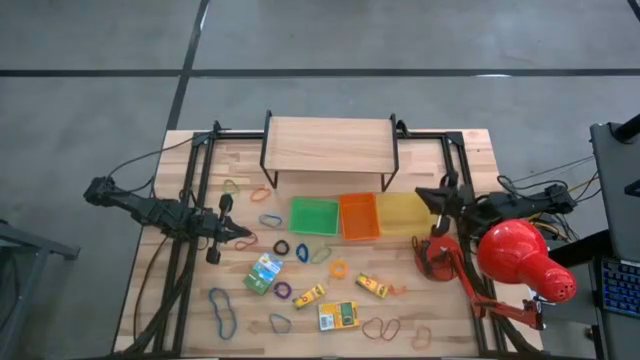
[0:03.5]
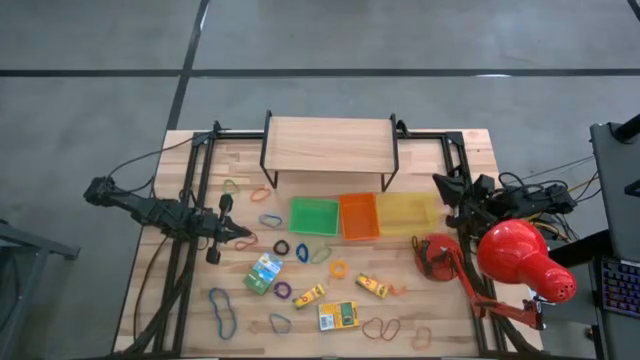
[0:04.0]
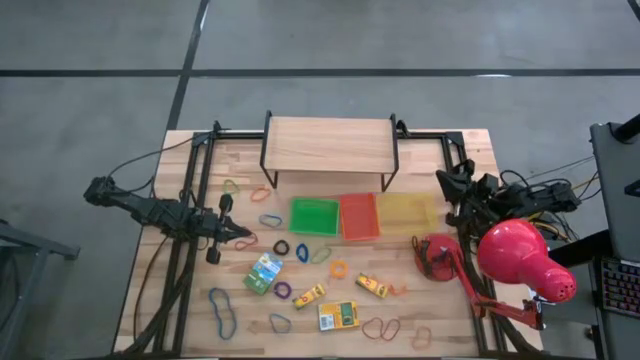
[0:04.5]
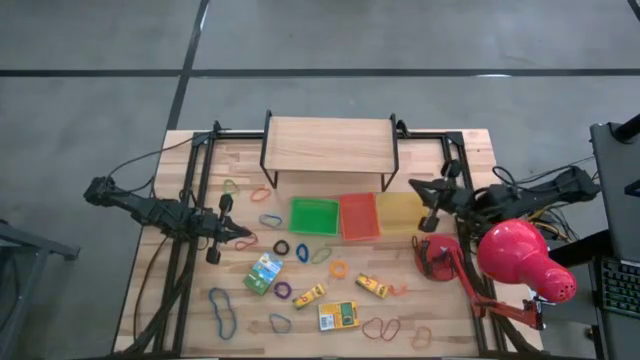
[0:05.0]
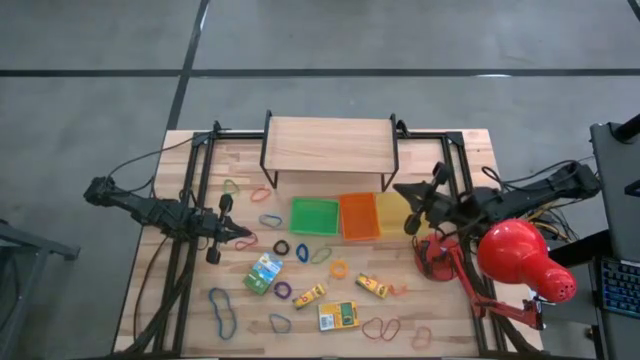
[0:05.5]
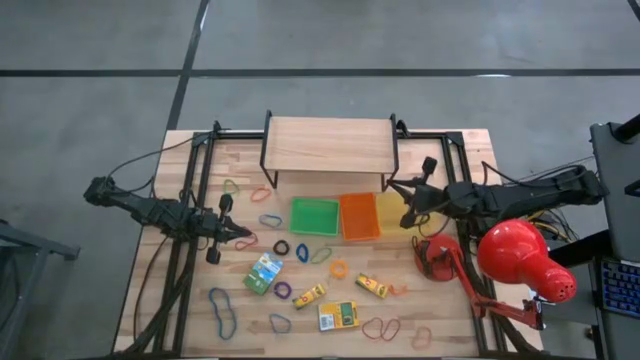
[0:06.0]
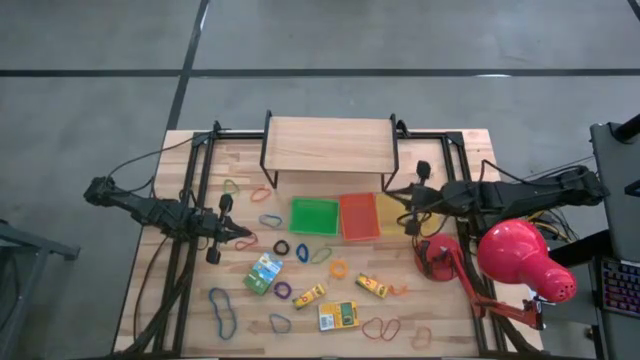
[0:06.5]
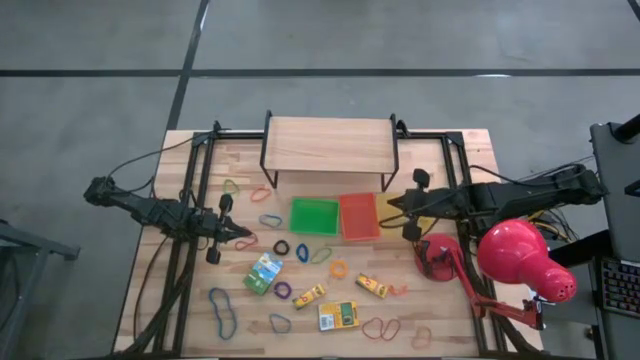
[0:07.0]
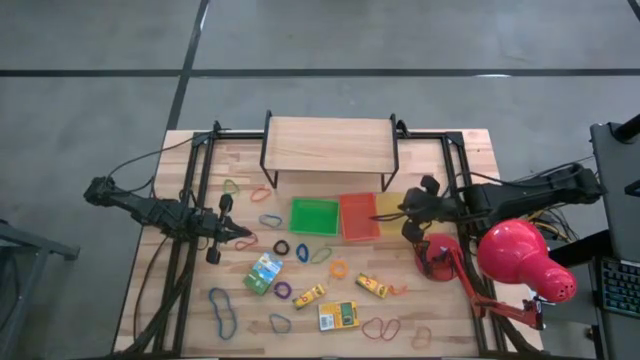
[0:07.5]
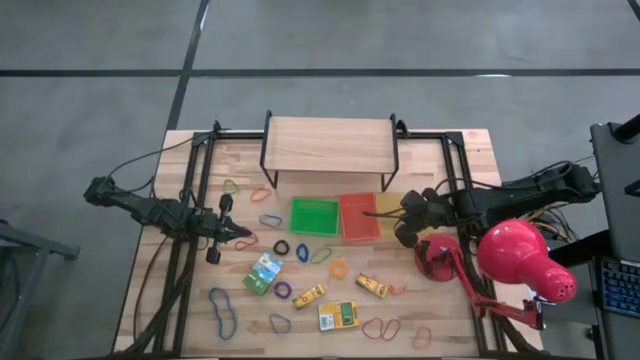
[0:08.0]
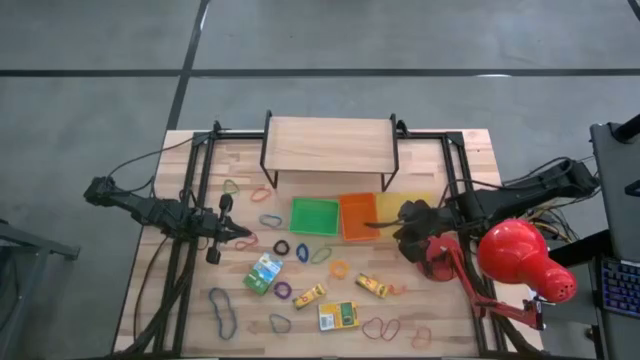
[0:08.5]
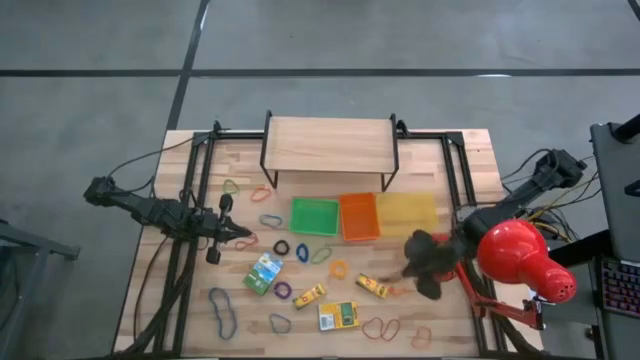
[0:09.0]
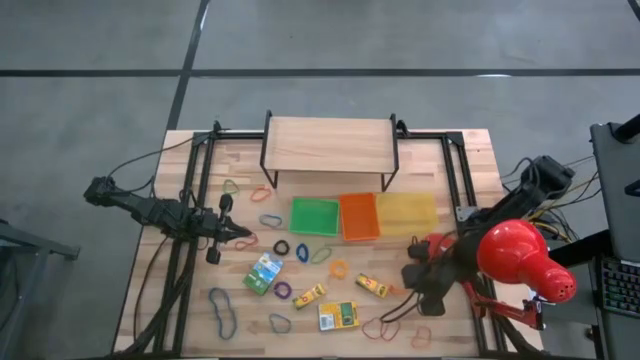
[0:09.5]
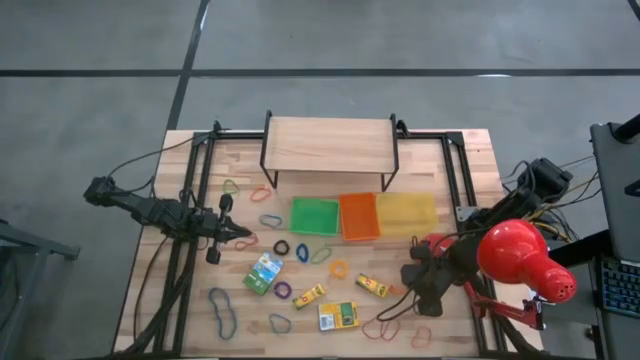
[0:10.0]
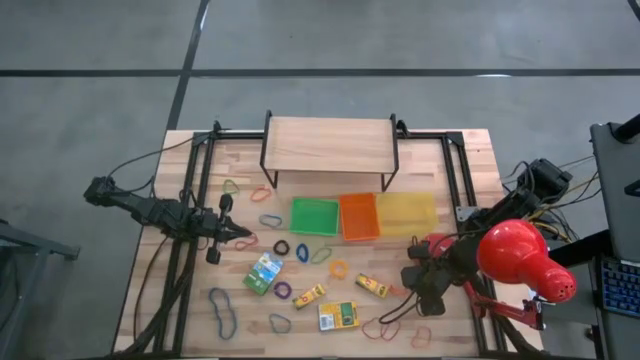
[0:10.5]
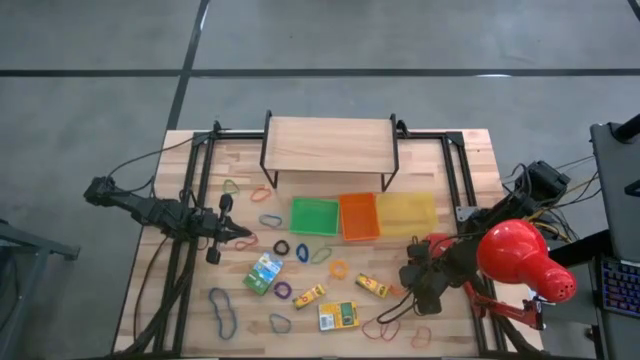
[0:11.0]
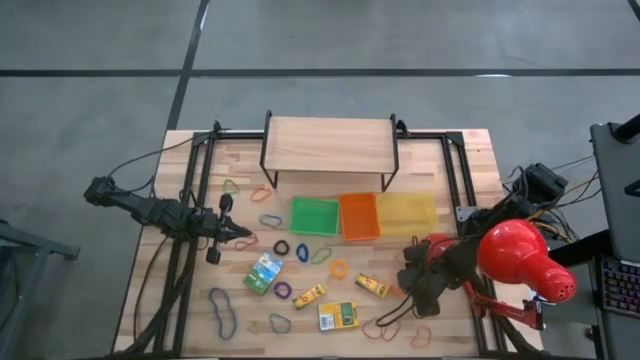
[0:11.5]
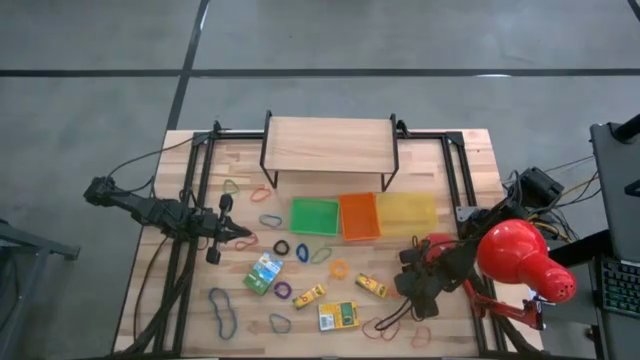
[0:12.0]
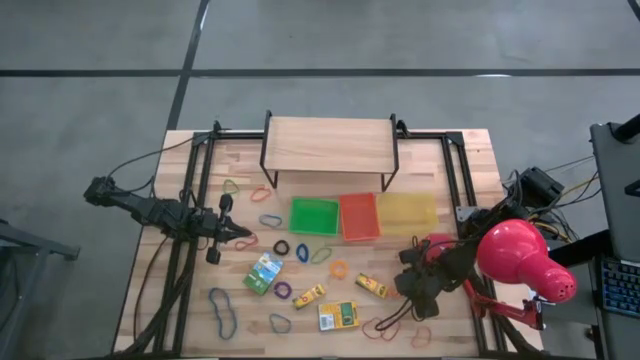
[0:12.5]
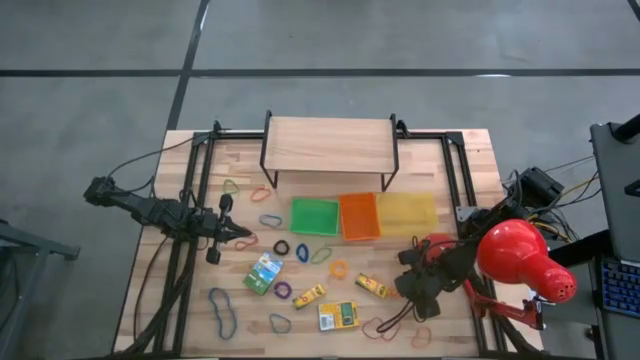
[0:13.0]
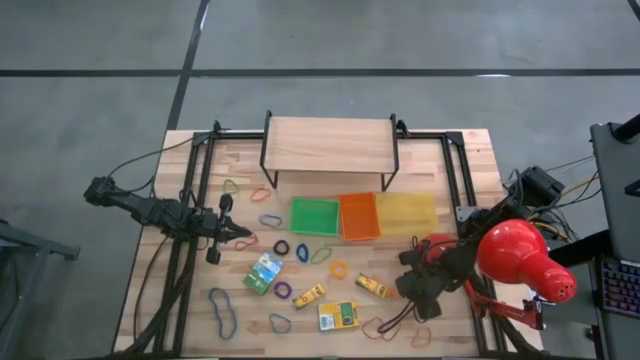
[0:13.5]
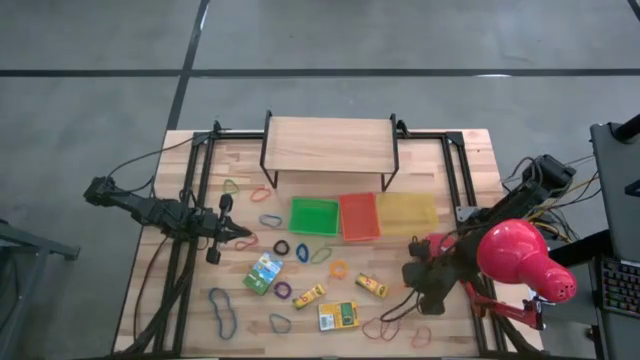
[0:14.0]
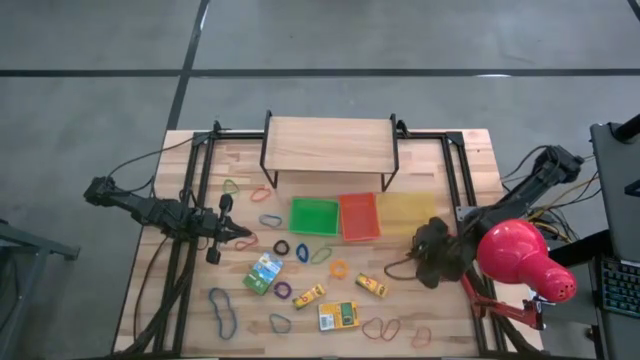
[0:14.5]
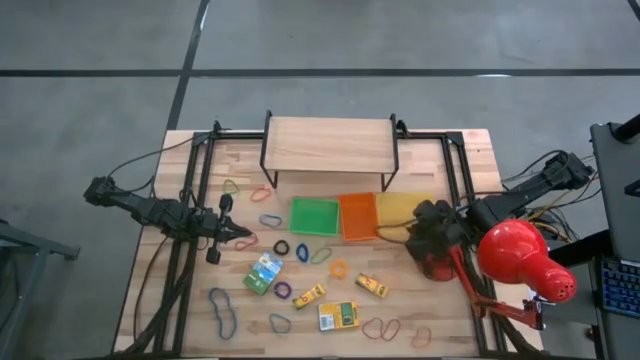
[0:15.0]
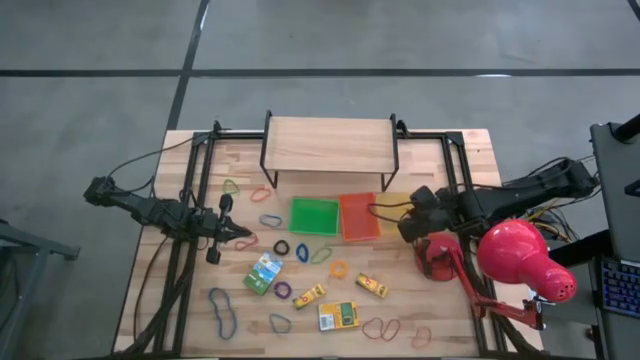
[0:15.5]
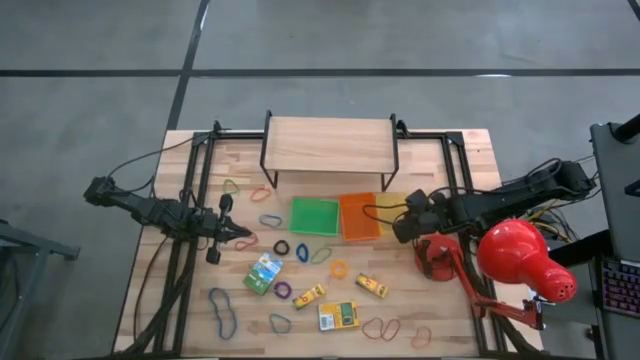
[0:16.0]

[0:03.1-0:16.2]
Task: Pick & Place Office Desk Supplies
Put the middle orange rubber band into the yellow bin

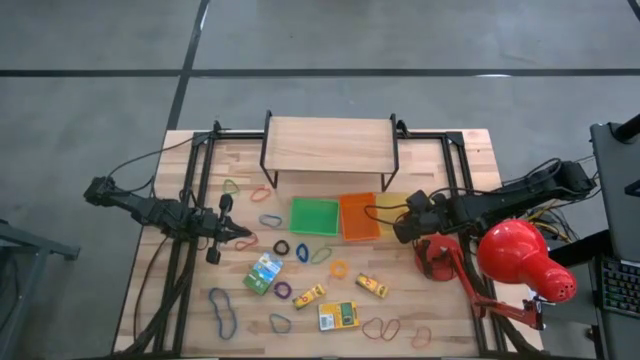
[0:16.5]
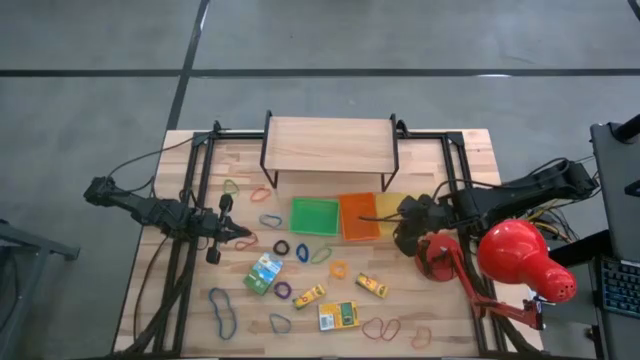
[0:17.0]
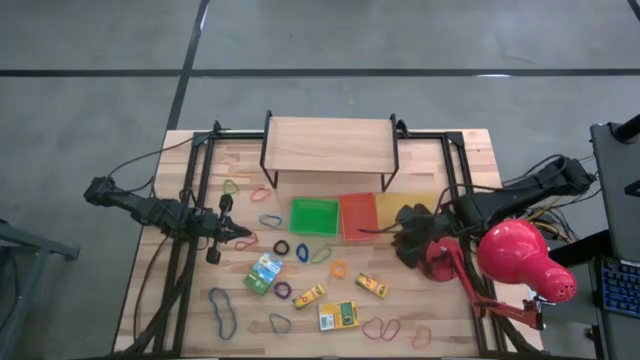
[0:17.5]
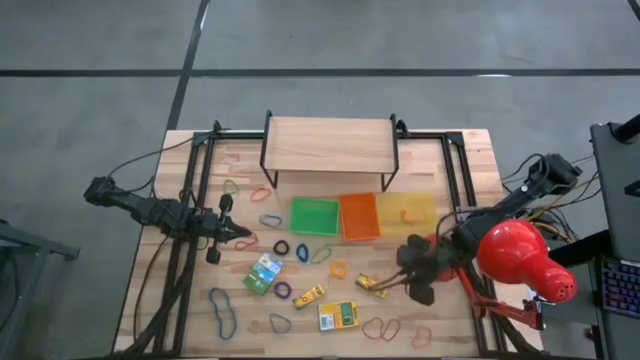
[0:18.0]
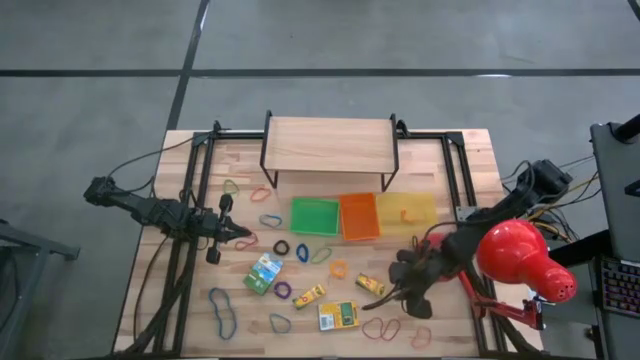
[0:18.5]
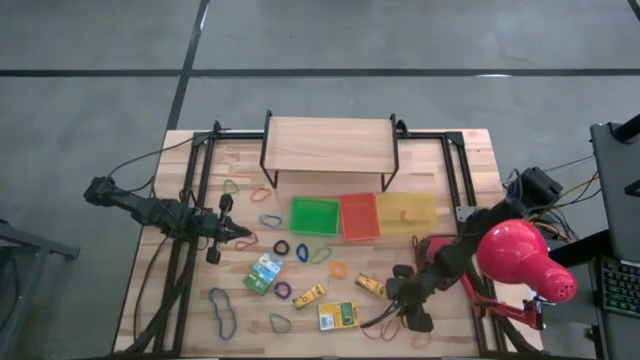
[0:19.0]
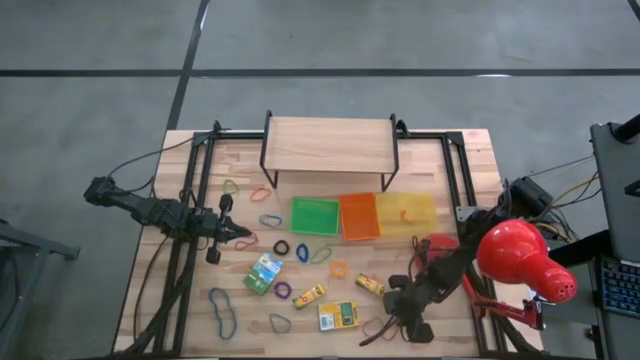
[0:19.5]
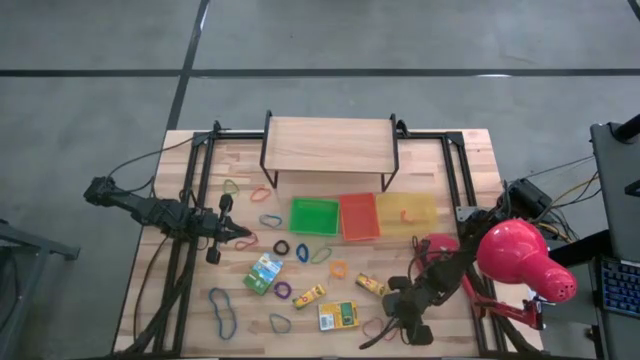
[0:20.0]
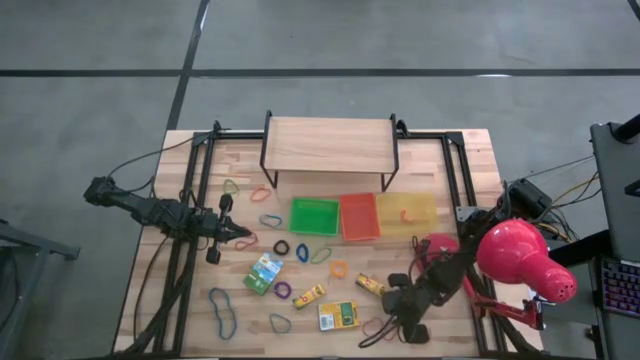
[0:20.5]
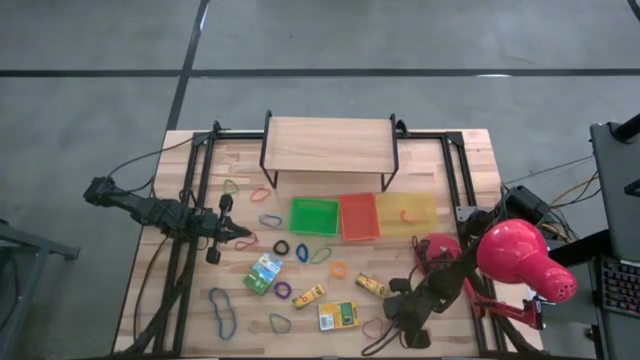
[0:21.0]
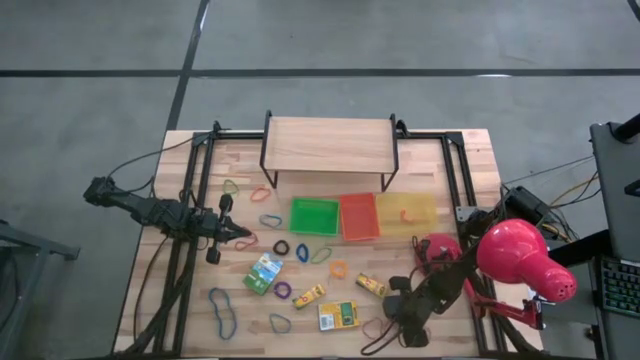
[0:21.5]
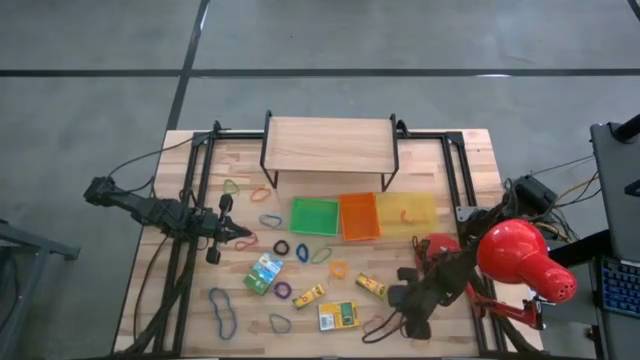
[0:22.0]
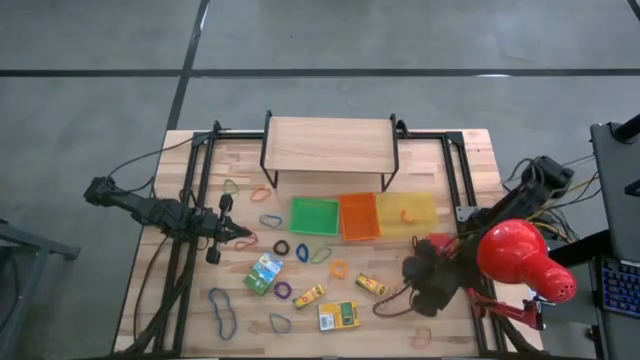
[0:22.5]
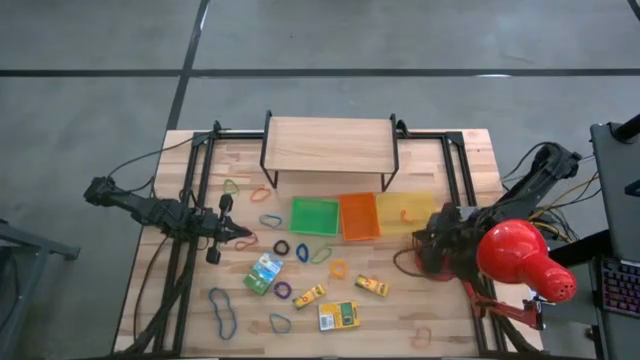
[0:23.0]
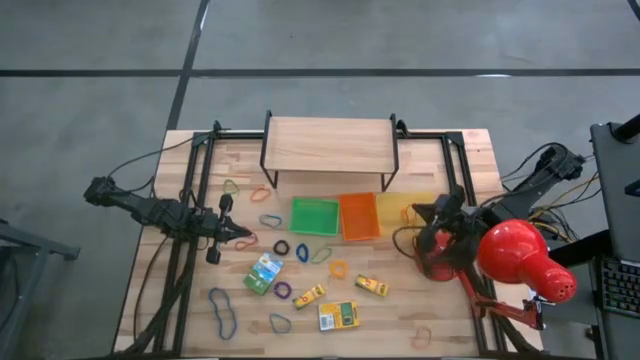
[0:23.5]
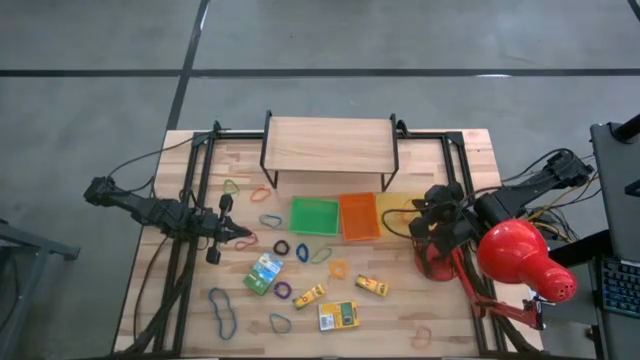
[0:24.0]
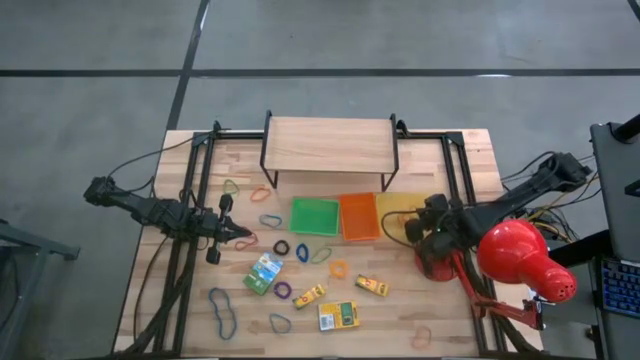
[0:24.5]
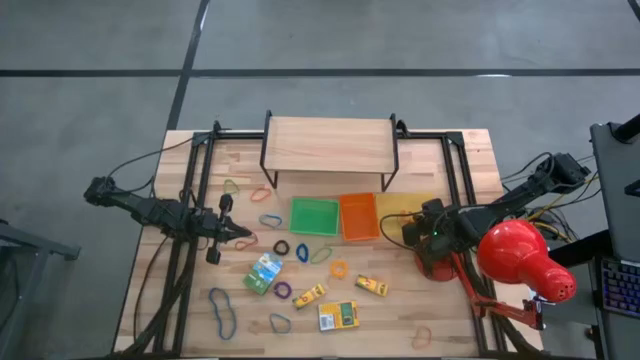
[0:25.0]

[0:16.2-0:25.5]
Put the bottom red rubber band into the yellow bin
